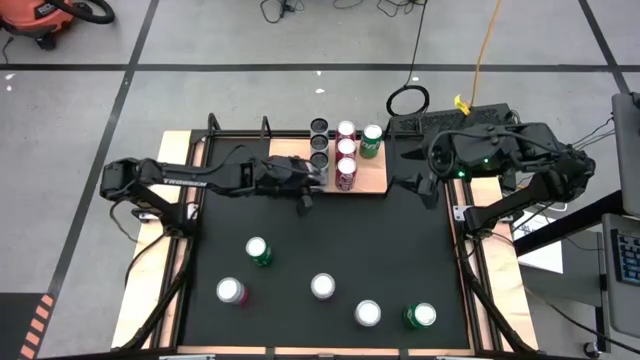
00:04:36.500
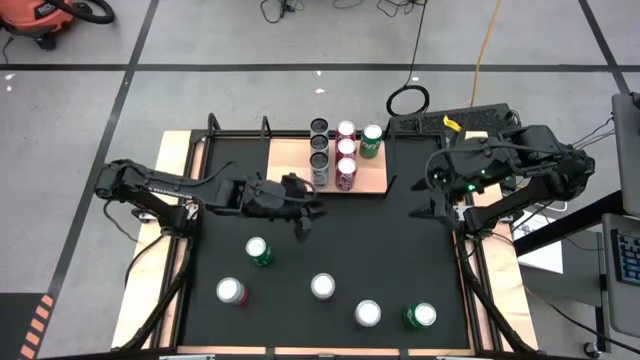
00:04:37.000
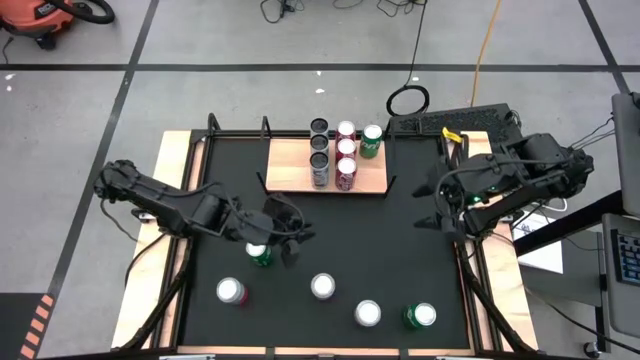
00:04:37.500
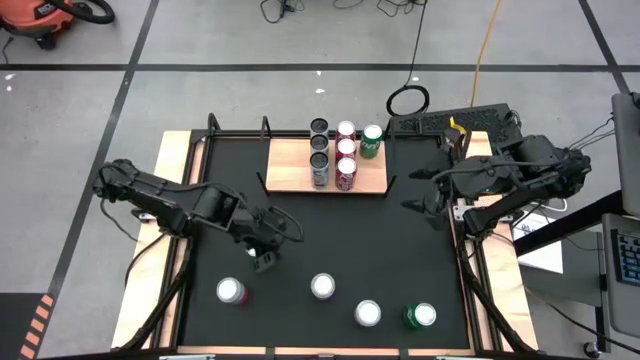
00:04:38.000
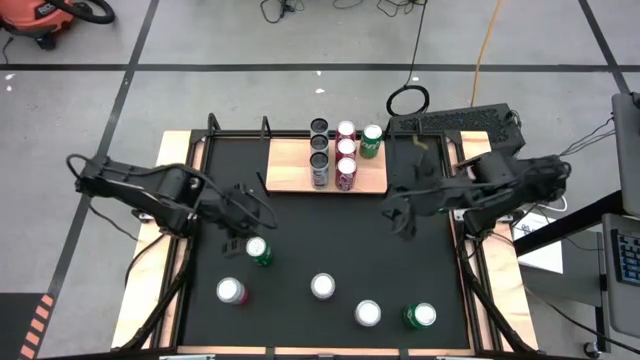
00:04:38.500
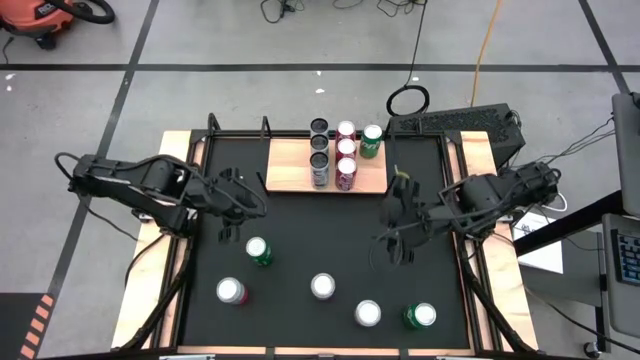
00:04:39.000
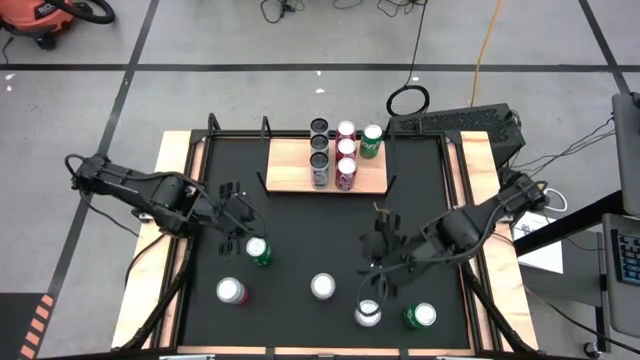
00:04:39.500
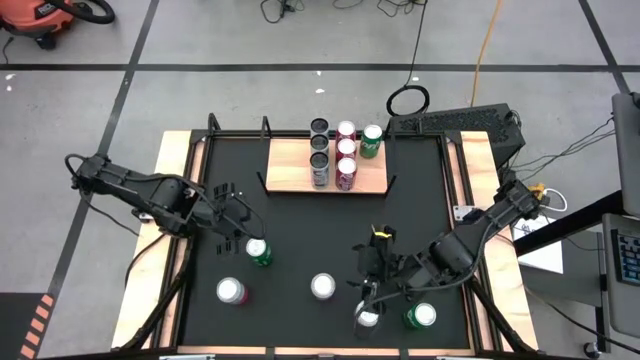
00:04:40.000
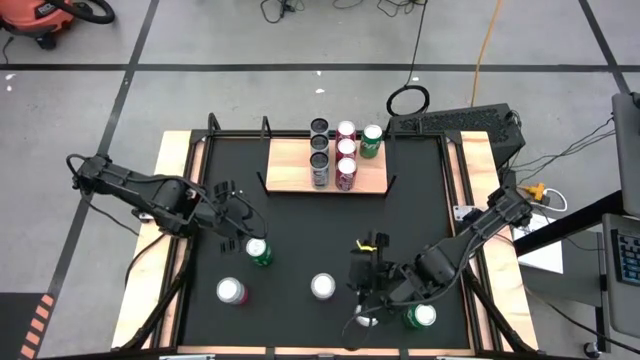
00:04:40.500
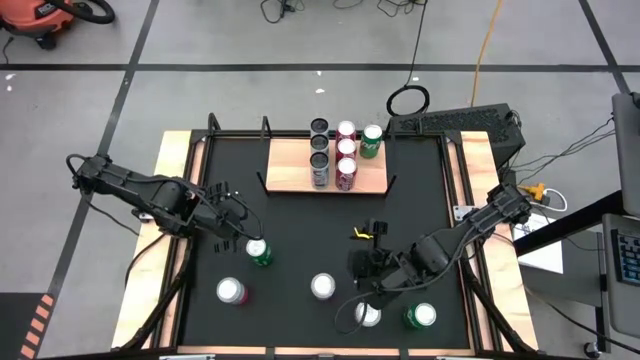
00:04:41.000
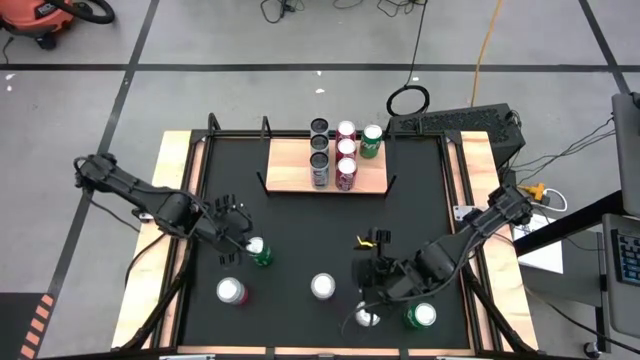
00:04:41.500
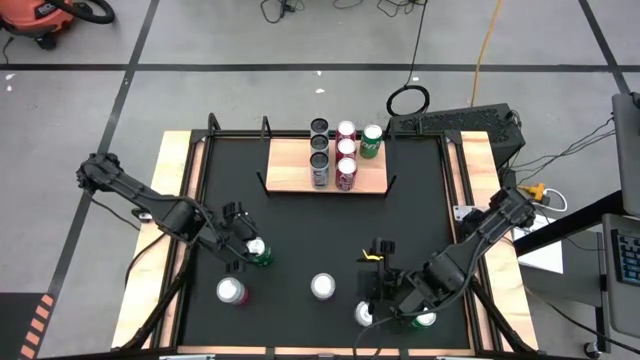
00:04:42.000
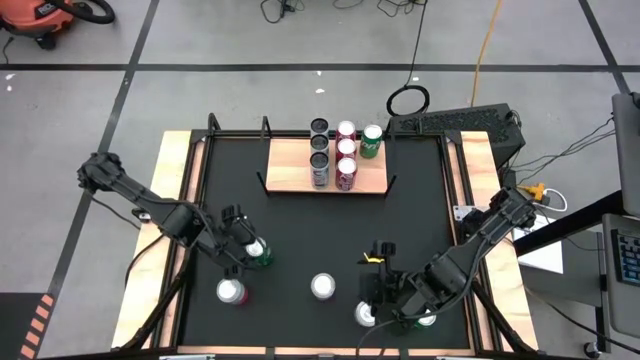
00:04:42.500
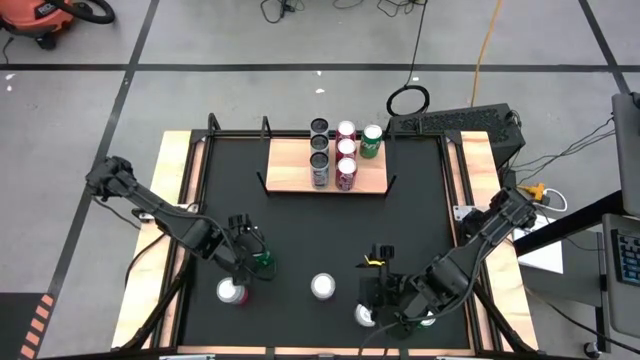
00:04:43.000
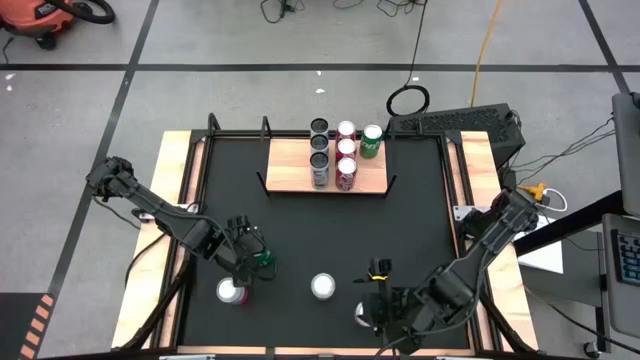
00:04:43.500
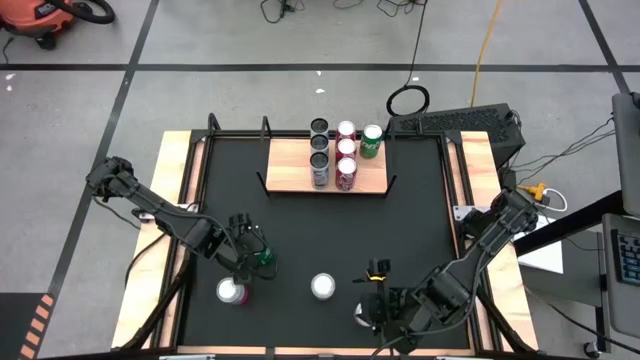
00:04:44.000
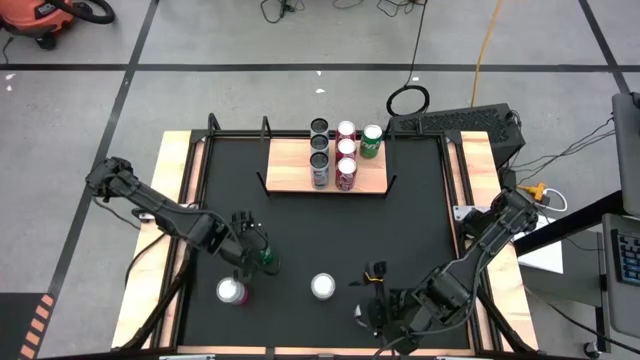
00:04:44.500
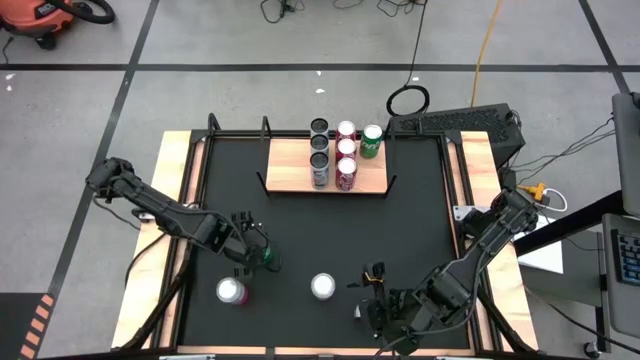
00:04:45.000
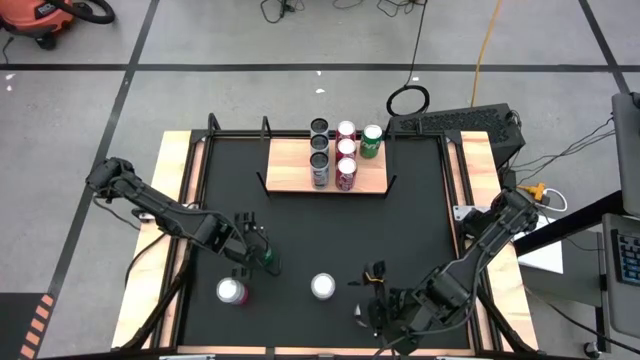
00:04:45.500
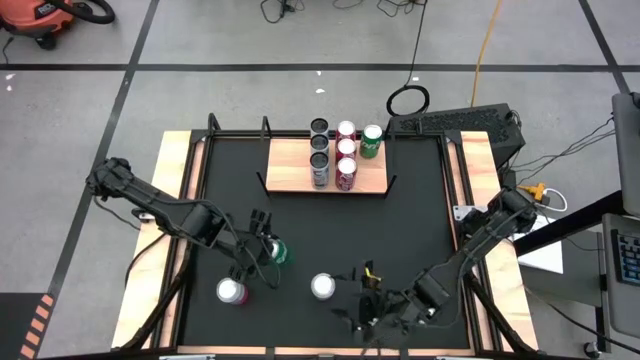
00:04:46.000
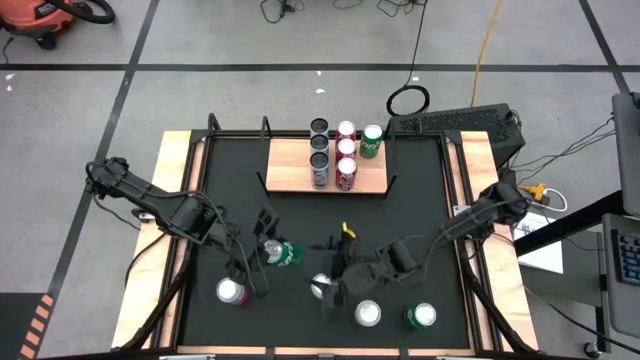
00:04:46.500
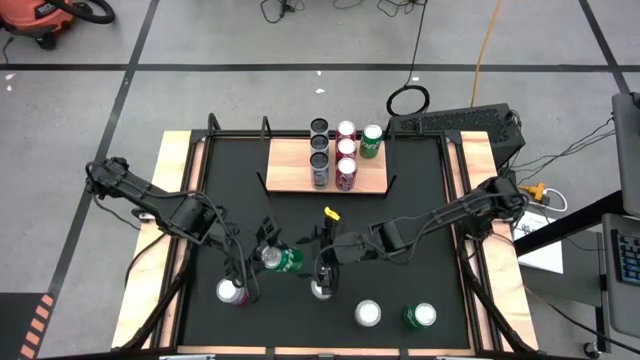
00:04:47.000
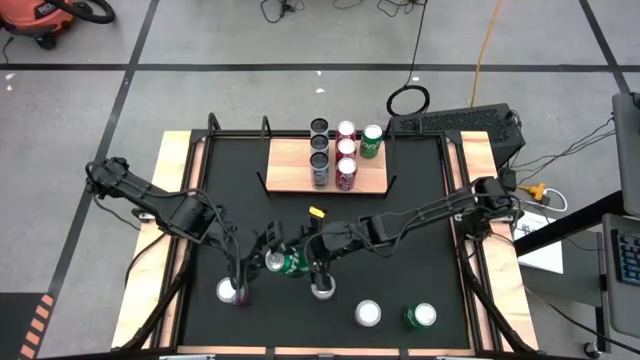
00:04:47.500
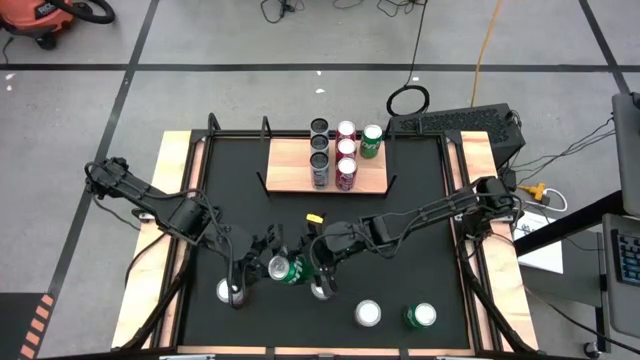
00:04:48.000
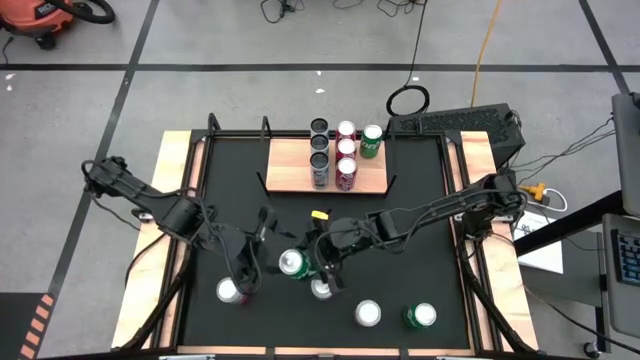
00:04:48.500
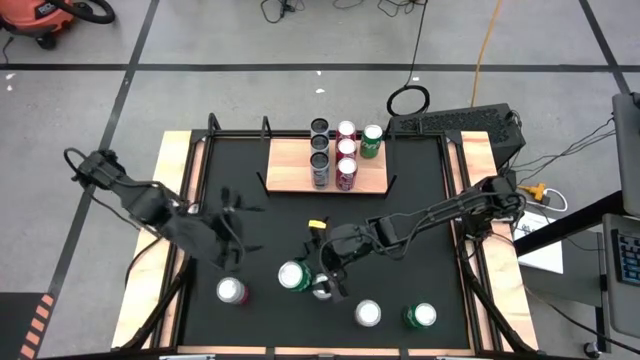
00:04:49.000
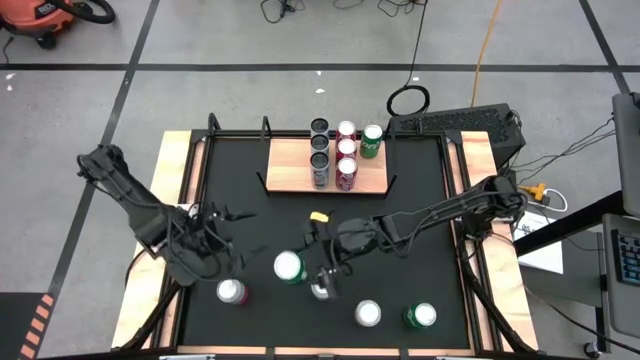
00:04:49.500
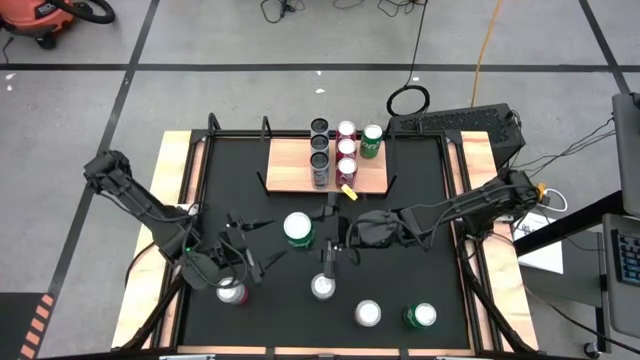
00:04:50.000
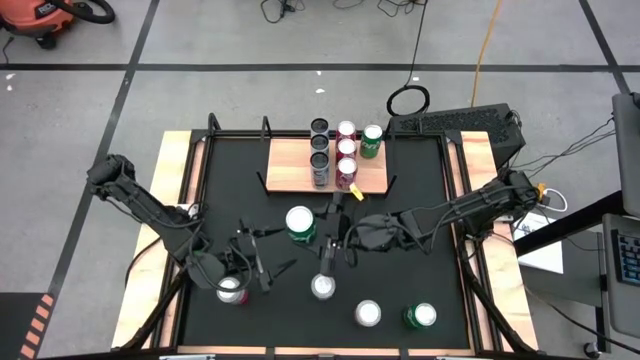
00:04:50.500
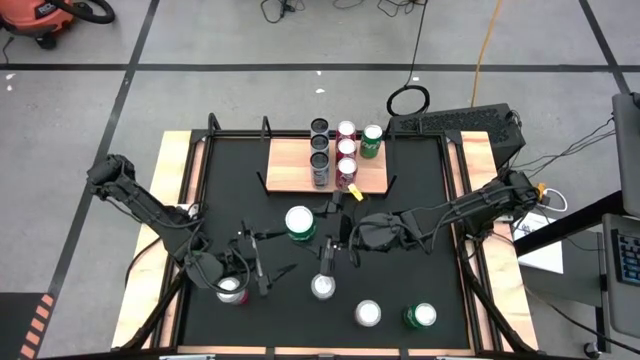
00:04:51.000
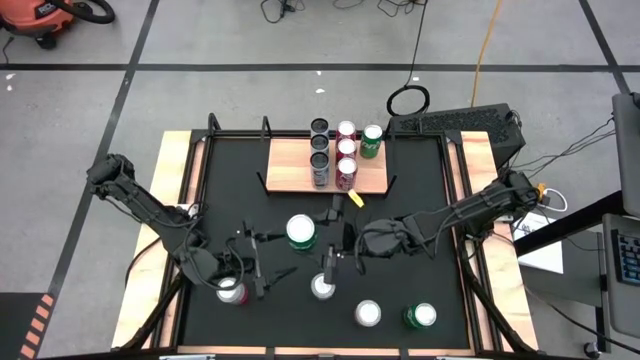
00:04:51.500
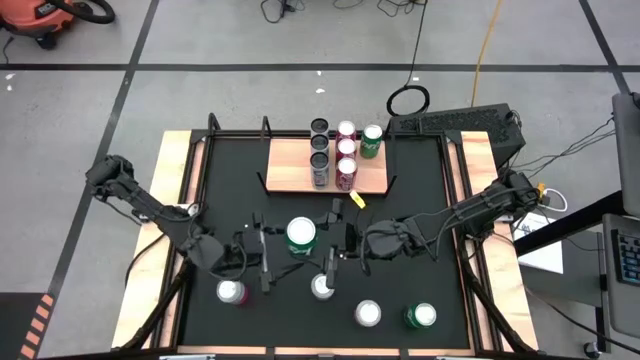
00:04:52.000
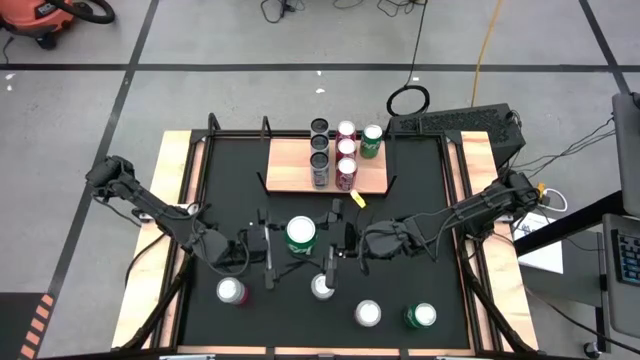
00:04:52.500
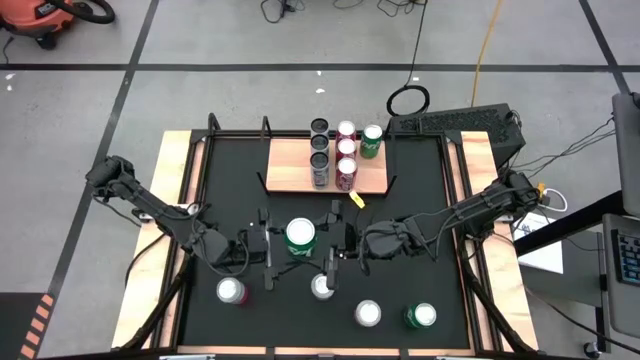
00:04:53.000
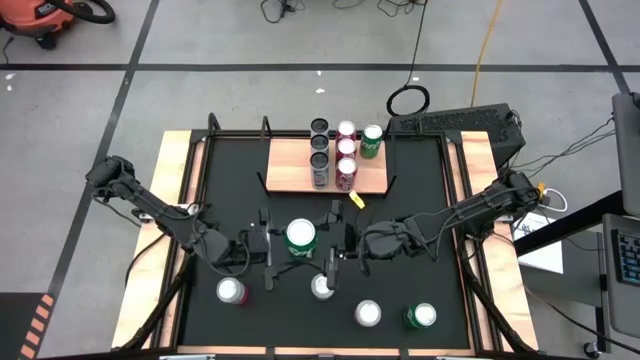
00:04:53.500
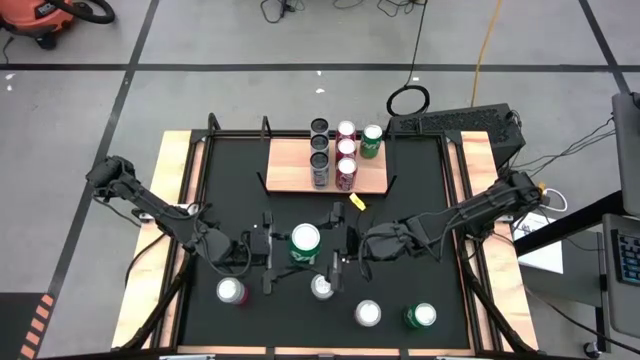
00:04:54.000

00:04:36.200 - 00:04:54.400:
Task: Place canned beverage on shelf
Put the top left green soda can on the shelf

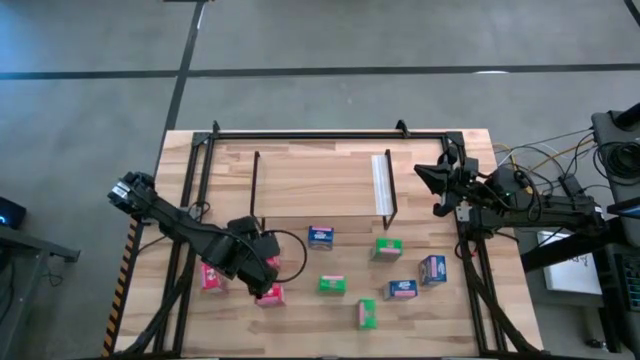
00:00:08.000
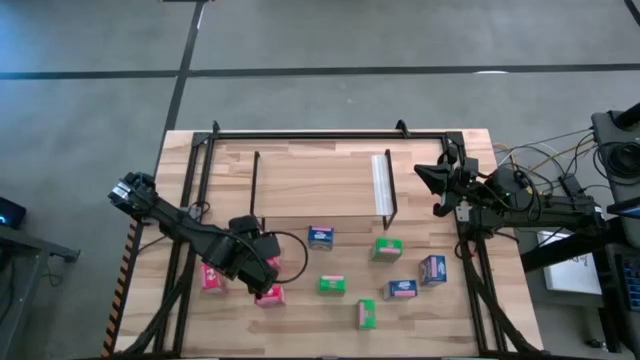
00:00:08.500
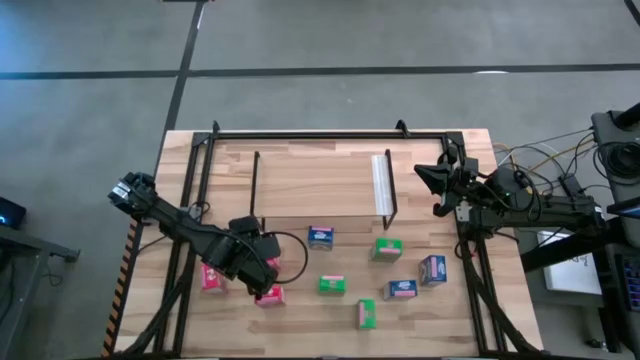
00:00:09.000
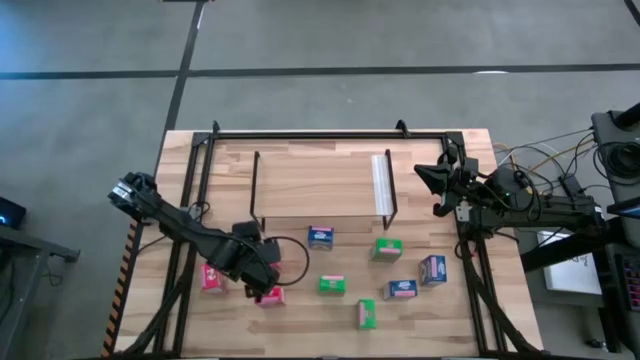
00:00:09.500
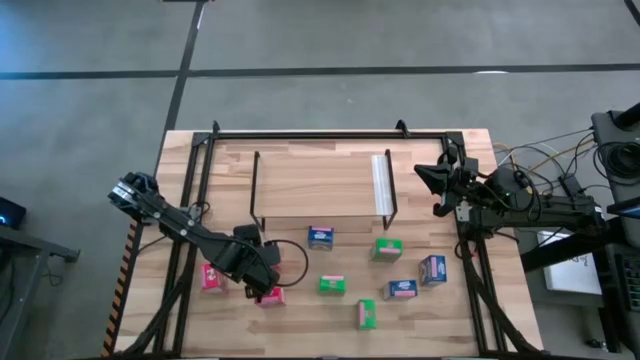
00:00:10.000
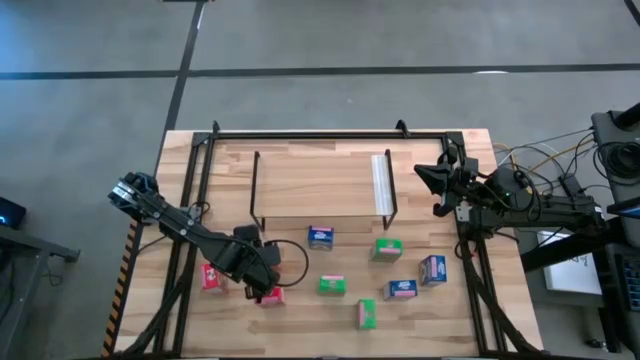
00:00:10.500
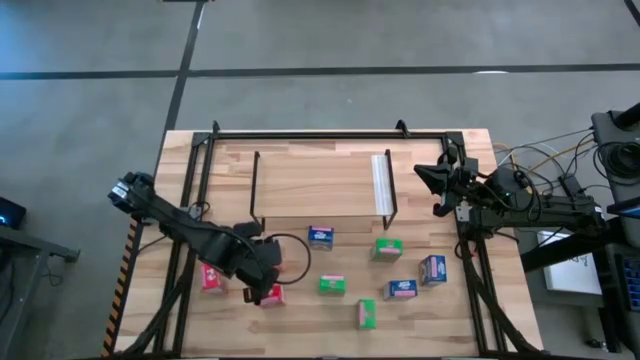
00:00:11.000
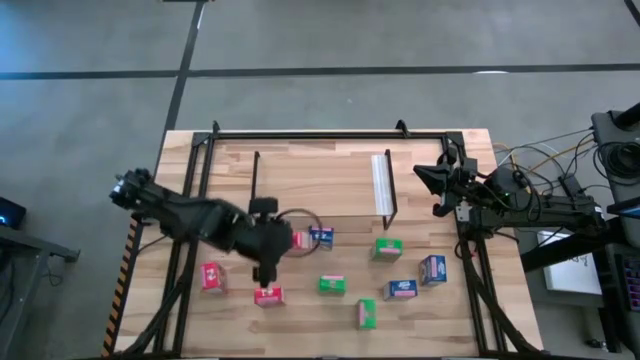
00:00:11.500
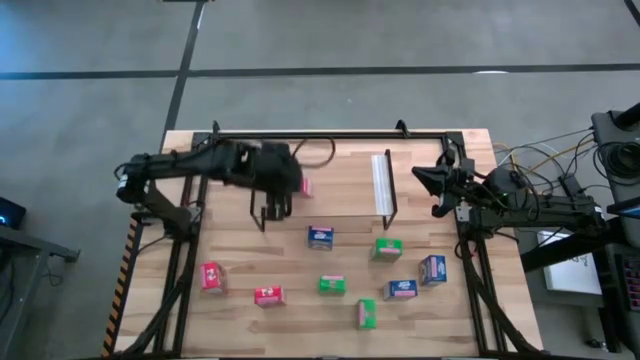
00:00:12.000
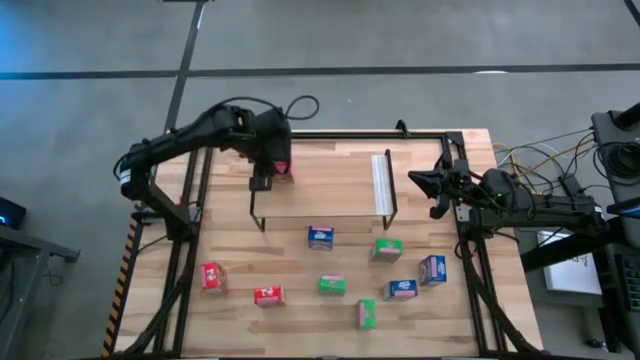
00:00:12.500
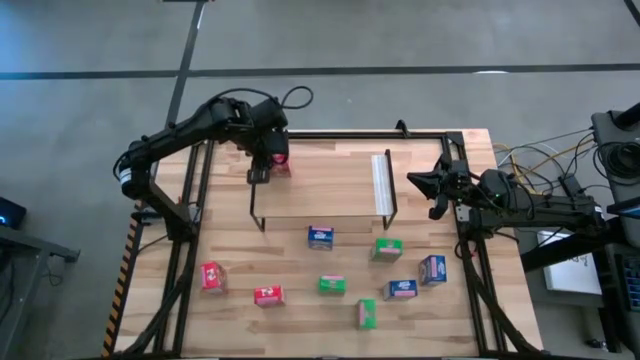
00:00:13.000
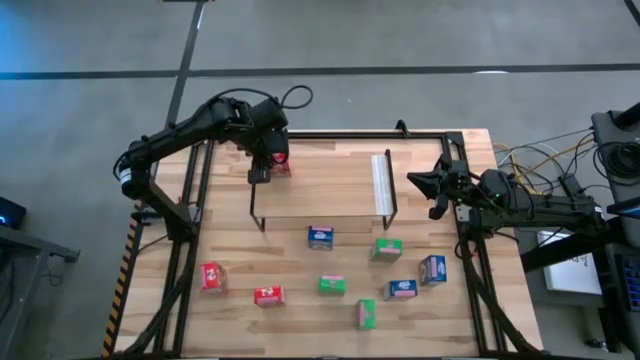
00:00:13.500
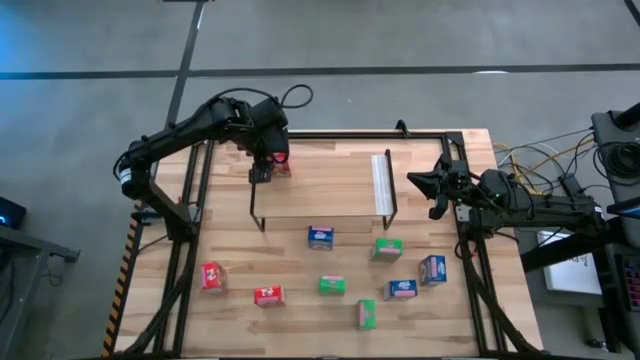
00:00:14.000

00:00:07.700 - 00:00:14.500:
Task: Stack cereal on shelf
Put the top right red cereal box on the shelf
